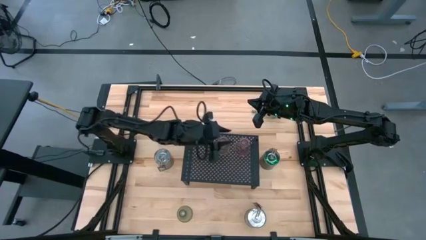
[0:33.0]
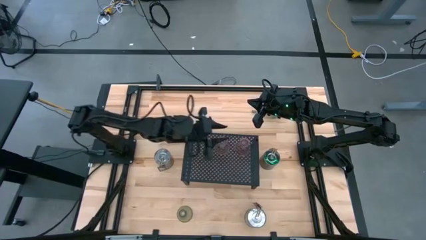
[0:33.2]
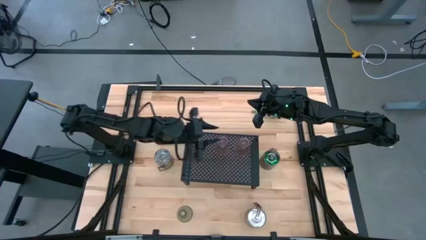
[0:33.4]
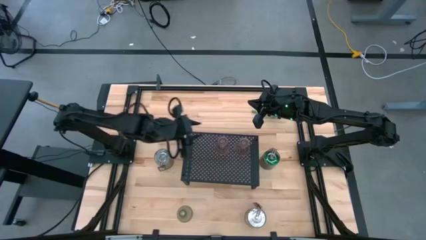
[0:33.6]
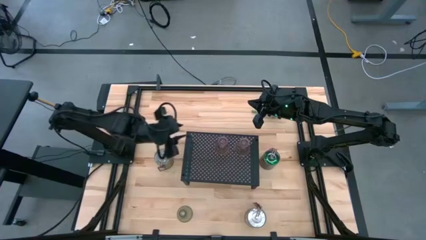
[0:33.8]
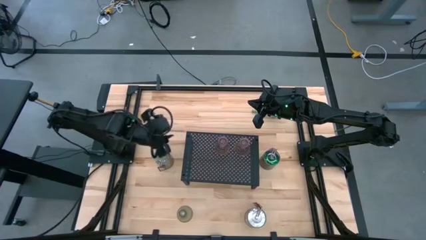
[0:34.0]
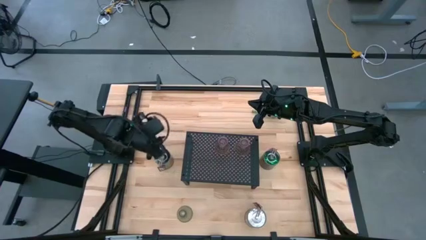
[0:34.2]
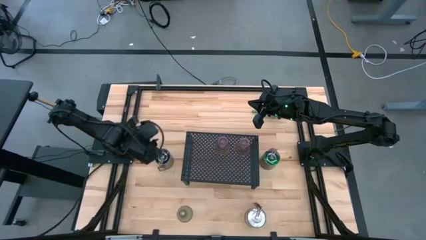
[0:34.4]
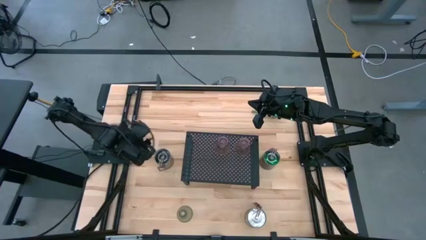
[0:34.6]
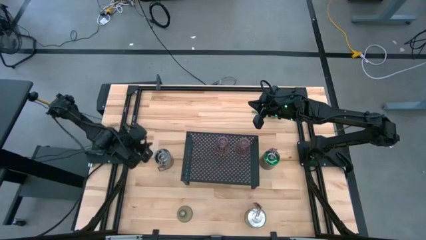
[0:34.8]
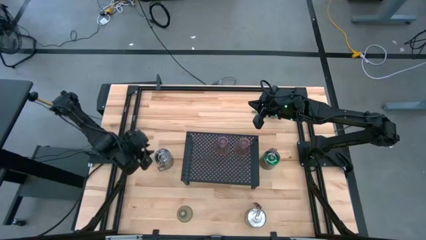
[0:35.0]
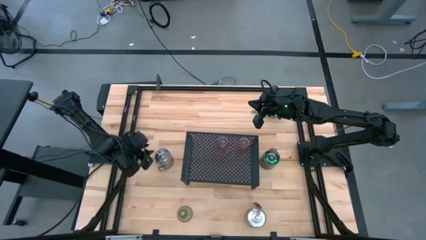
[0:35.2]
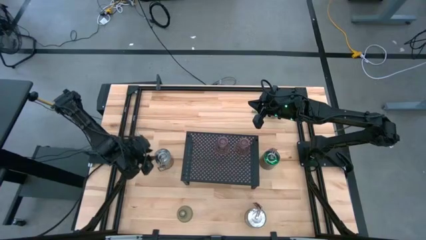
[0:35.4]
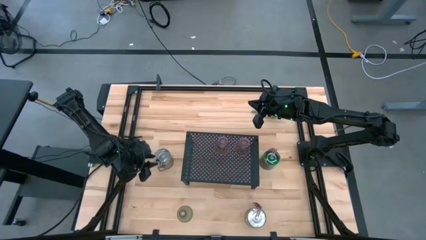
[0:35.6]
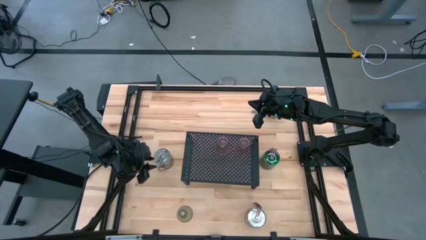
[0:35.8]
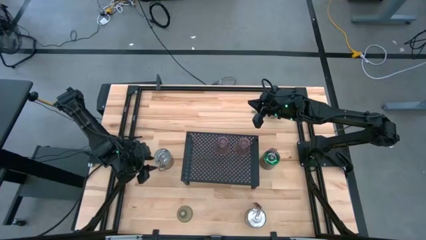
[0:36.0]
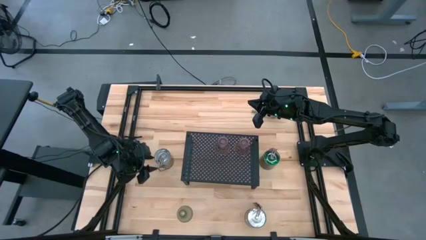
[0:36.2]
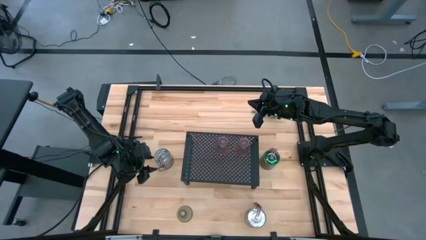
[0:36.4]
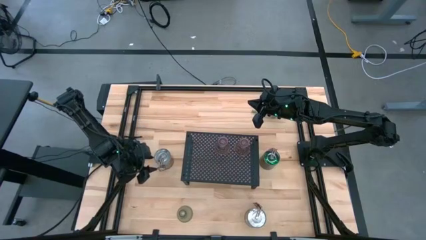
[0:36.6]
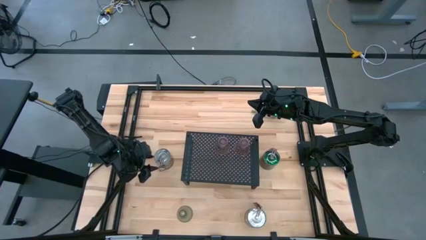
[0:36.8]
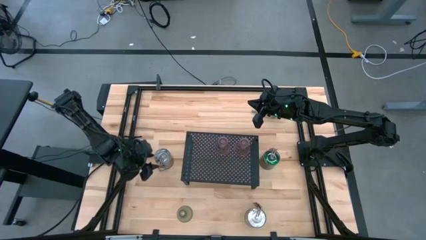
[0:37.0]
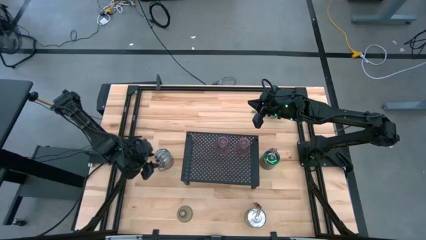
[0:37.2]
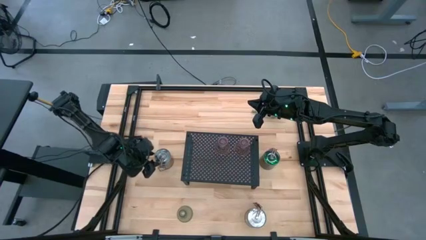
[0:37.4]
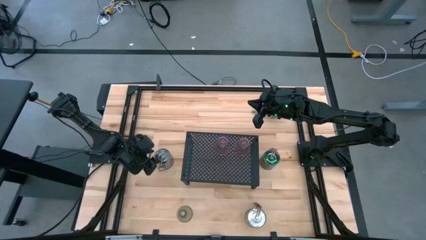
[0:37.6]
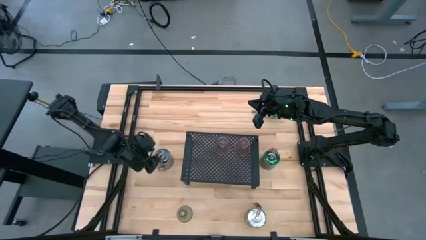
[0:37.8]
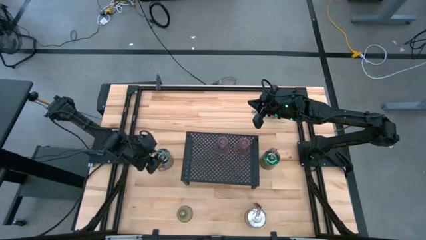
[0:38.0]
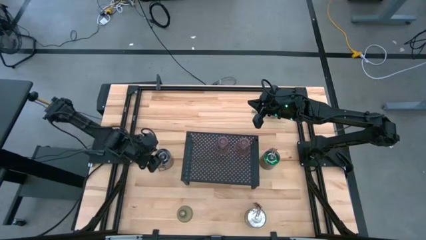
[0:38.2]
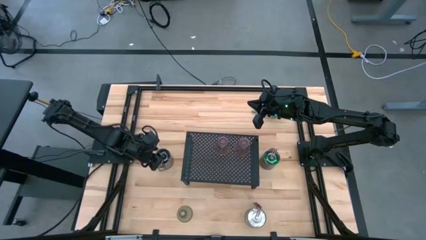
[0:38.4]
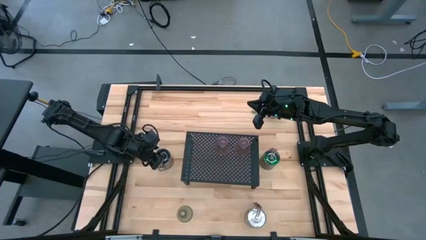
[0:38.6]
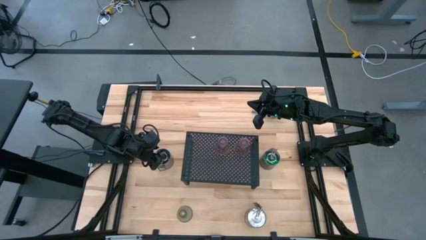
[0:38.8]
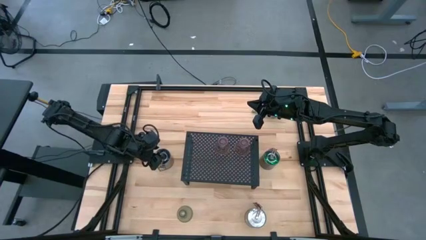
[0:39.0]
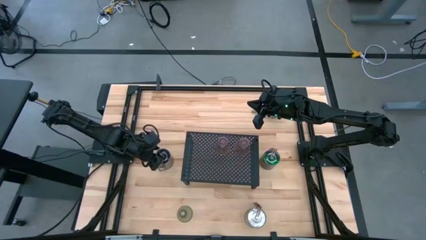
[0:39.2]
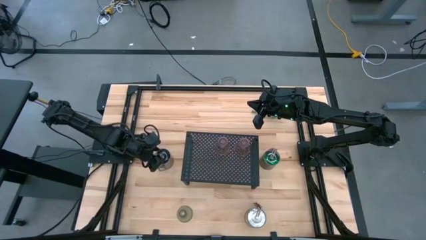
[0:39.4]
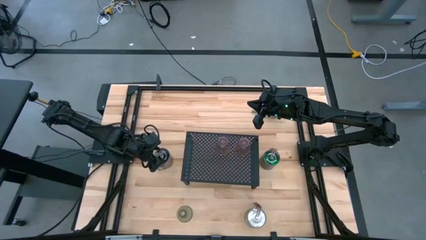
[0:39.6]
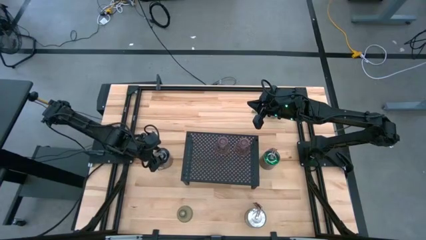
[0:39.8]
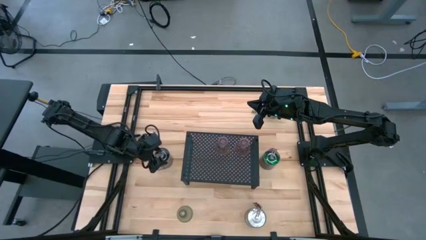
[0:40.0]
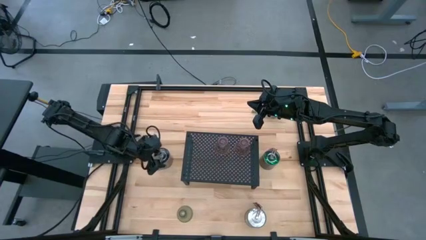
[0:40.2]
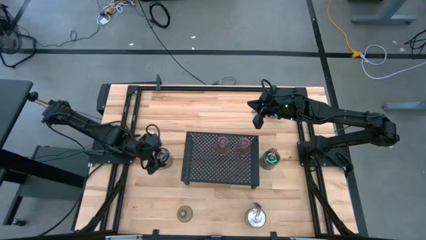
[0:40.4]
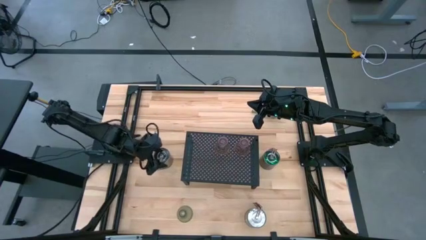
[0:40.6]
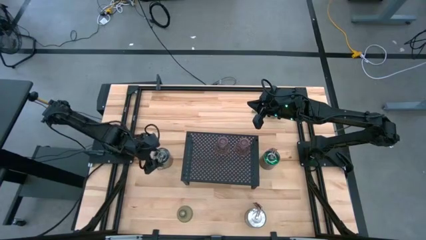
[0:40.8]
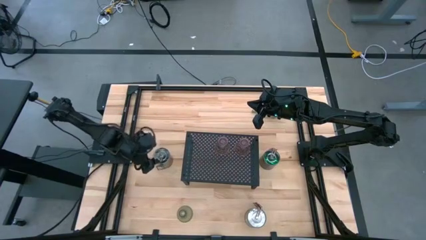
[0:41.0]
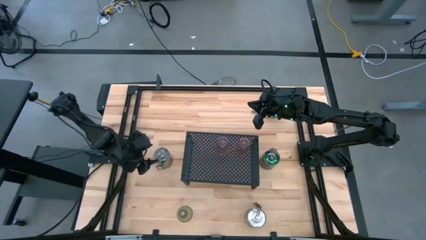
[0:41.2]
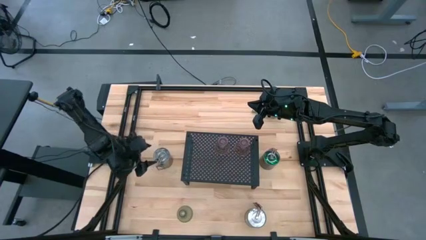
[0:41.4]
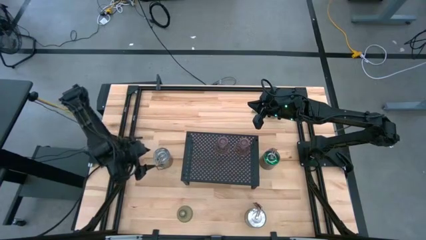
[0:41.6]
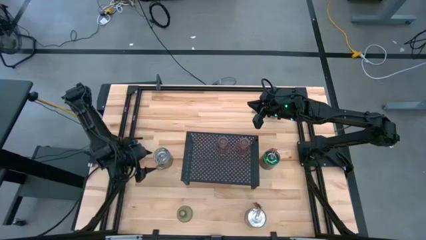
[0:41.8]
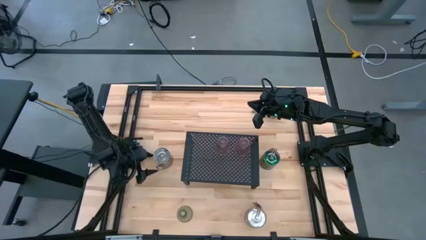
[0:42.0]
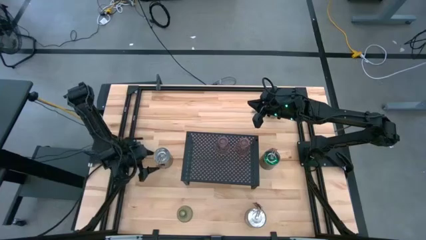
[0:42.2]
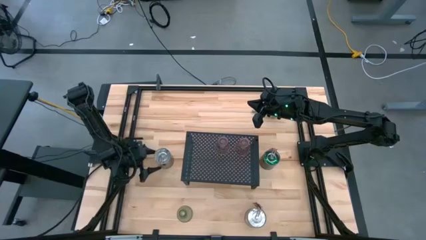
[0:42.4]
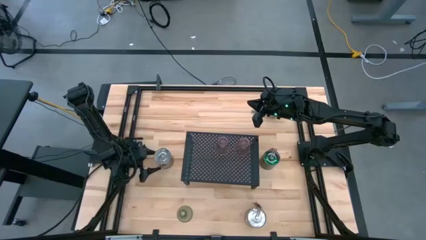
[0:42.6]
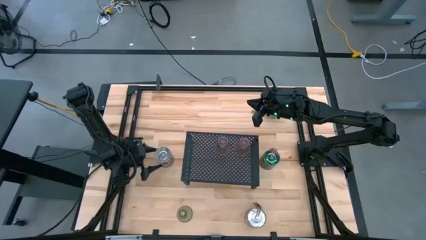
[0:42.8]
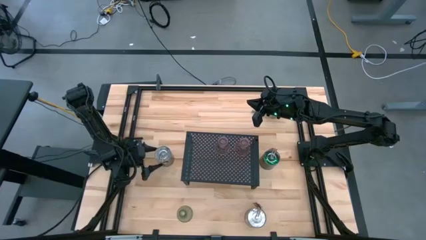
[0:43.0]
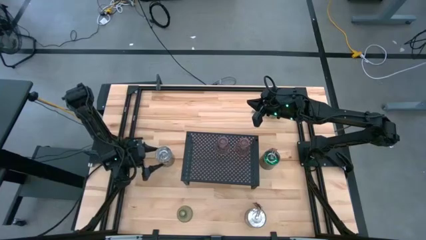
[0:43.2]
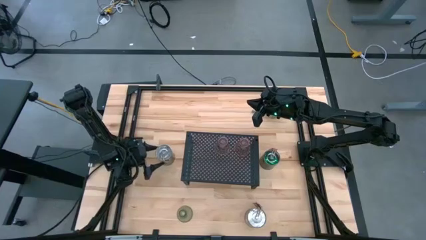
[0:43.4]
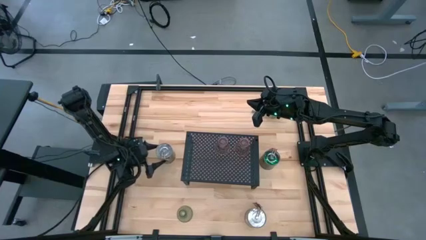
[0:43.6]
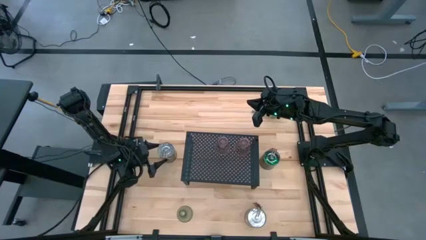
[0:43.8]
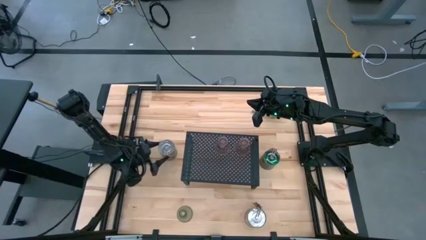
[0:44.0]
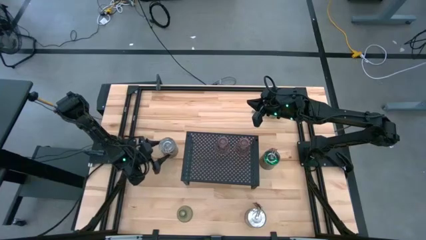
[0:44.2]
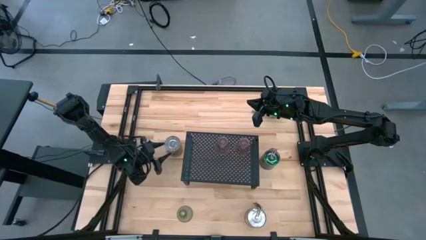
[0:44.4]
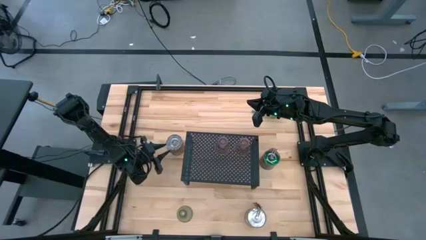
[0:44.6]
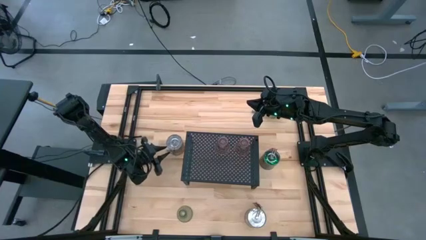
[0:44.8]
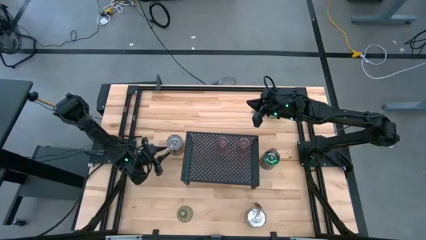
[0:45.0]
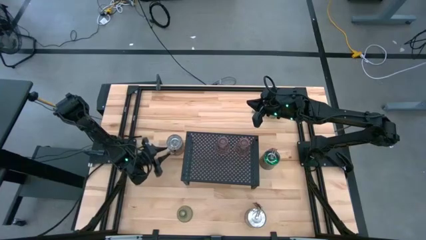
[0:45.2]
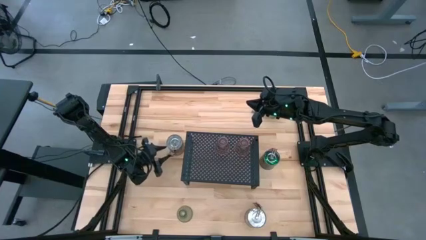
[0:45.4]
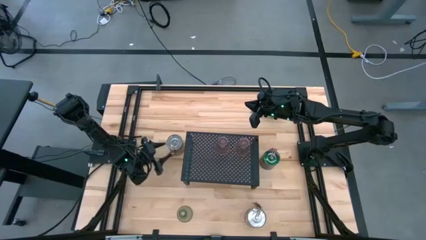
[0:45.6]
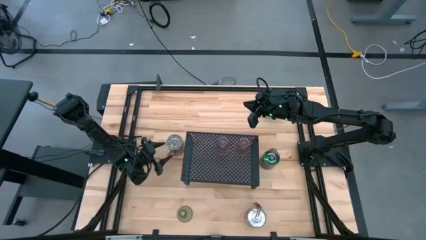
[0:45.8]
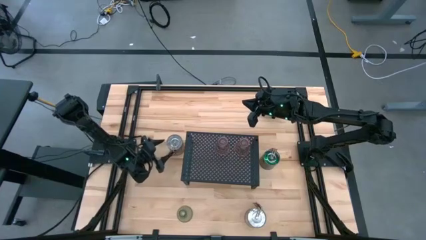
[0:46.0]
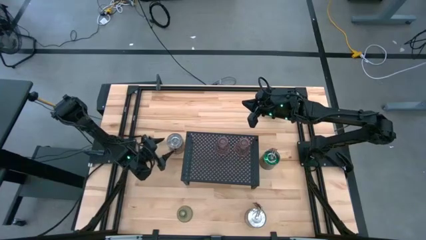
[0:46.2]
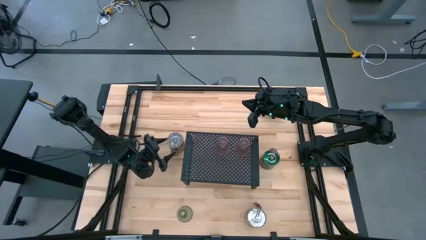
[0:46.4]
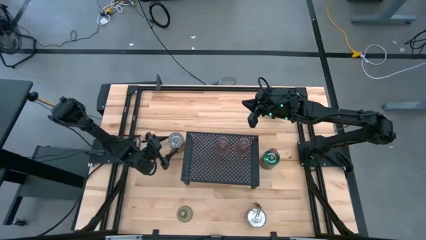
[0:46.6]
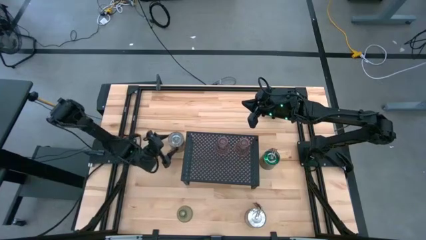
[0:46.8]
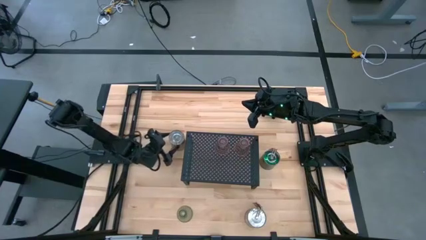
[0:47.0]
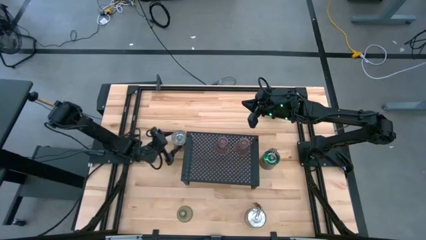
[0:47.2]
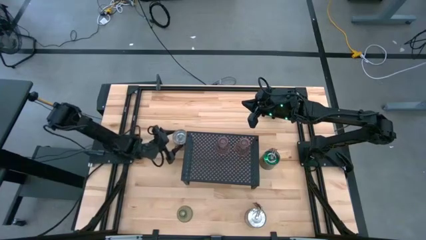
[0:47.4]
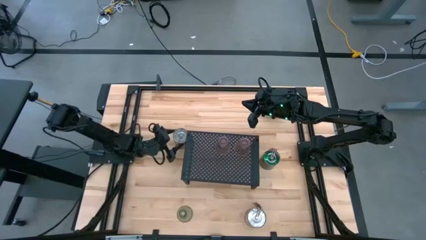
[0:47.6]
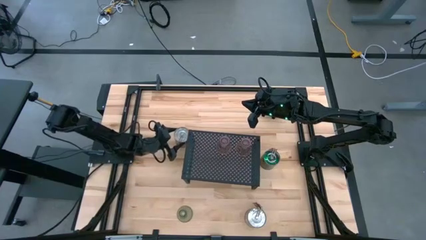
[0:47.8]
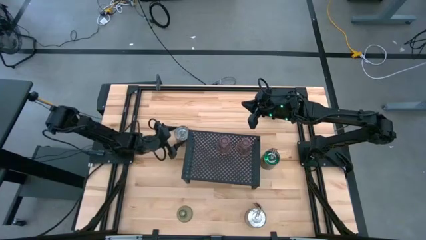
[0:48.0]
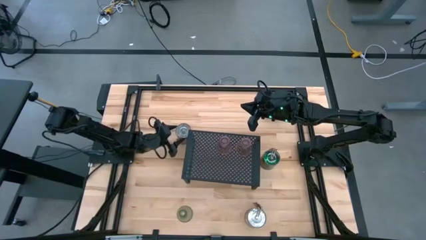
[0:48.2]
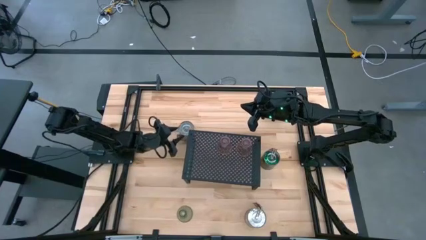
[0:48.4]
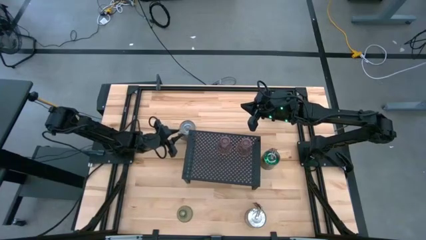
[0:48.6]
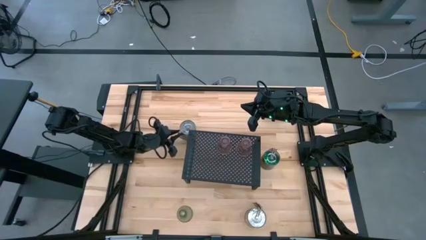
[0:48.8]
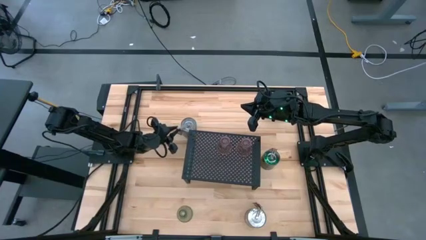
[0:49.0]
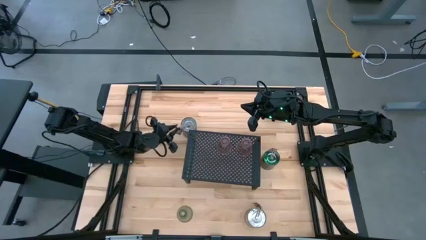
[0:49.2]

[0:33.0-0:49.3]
Task: Pick & Place candle stick holders
Put the top brown scented candle on the shelf

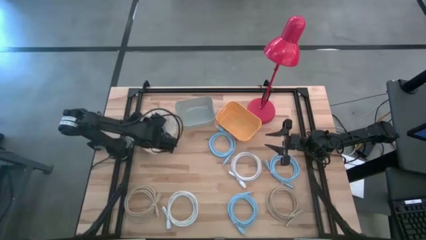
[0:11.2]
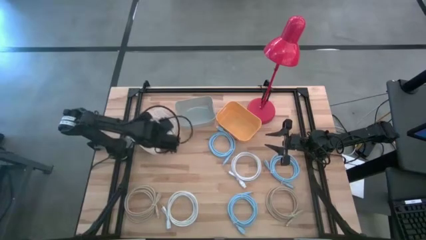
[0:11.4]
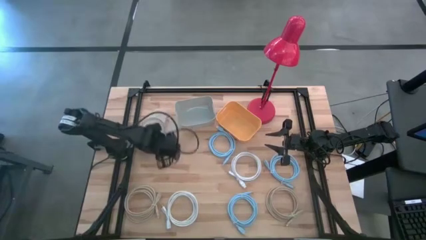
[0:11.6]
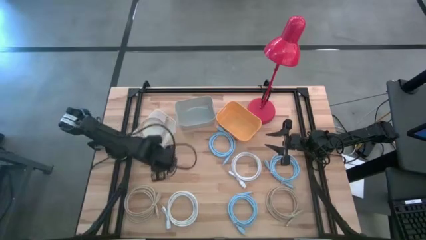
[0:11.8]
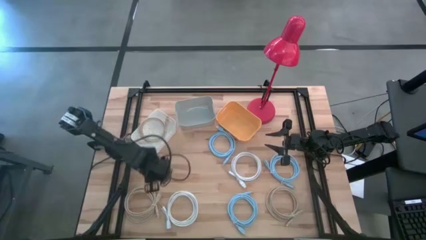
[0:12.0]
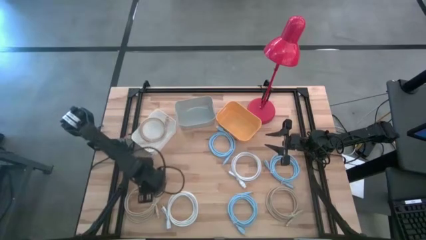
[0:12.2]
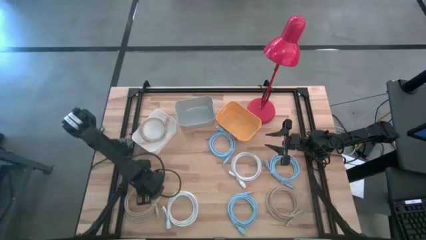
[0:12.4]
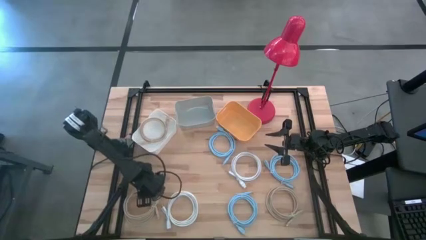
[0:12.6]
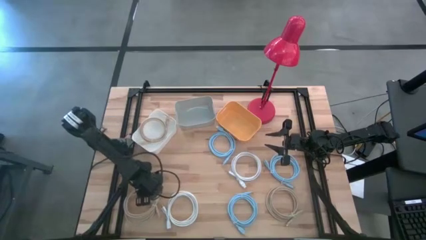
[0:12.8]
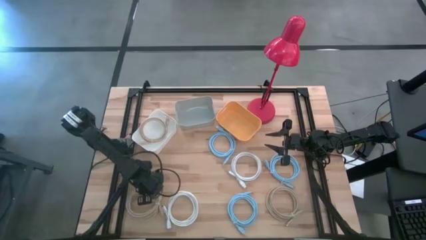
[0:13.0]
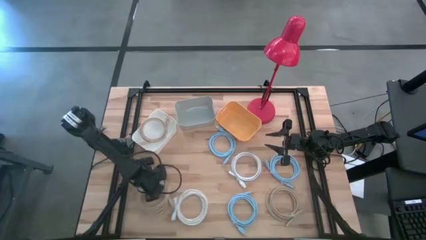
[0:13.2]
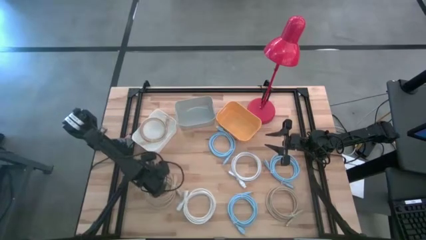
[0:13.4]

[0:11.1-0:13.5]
Task: Sort HDMI cables
Put the left brown hdmi cable into the white bin
